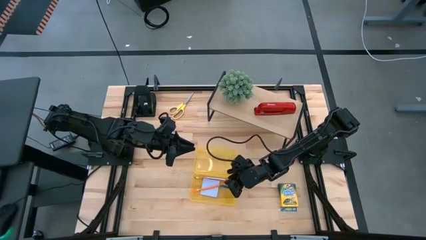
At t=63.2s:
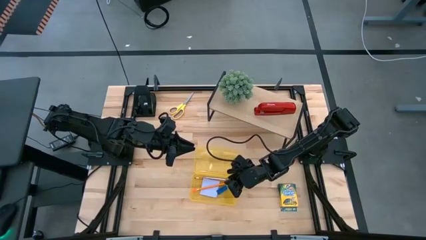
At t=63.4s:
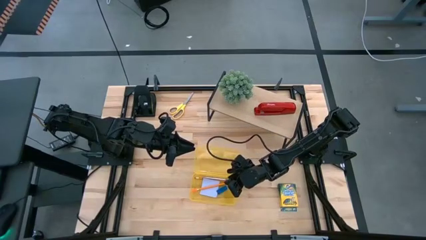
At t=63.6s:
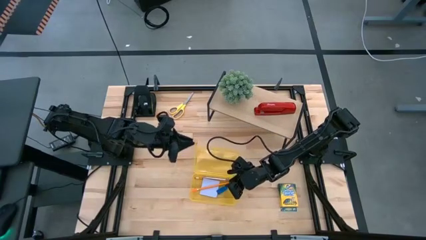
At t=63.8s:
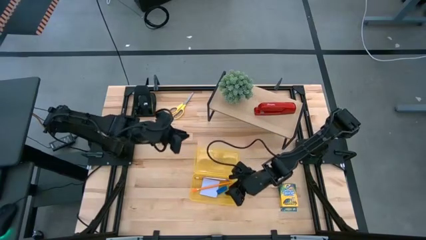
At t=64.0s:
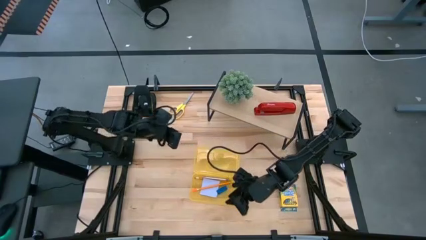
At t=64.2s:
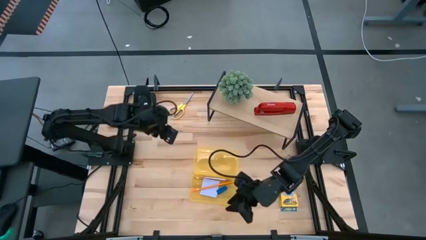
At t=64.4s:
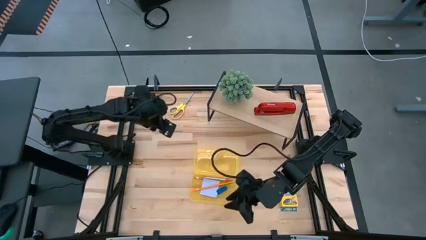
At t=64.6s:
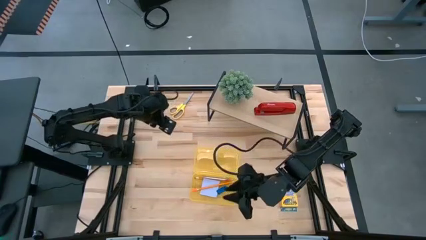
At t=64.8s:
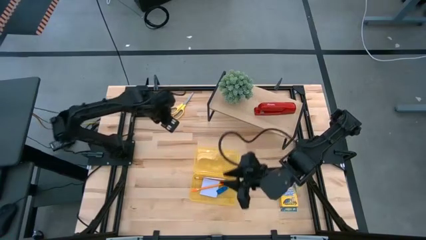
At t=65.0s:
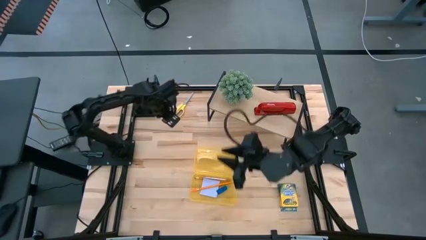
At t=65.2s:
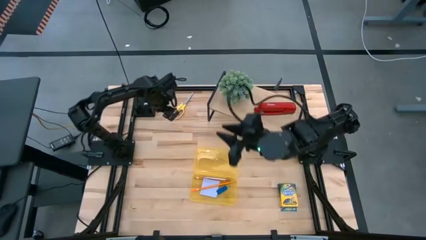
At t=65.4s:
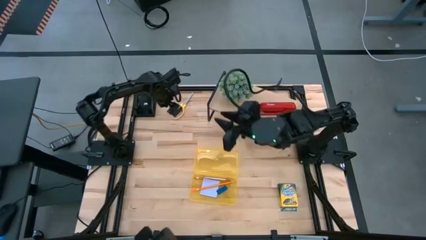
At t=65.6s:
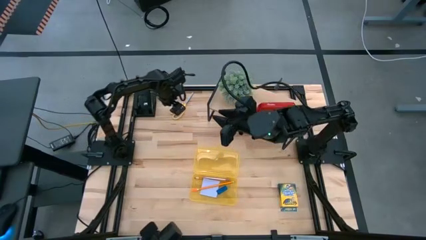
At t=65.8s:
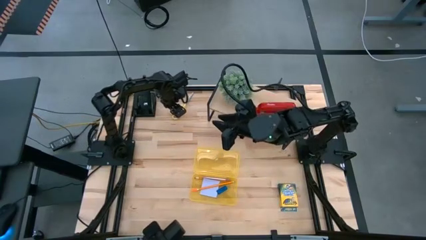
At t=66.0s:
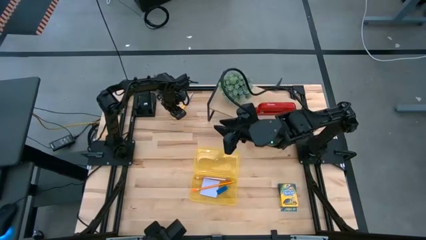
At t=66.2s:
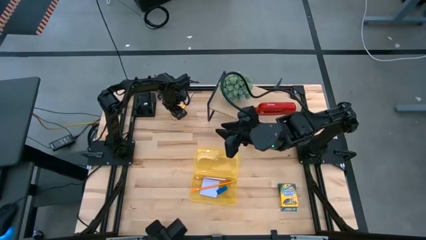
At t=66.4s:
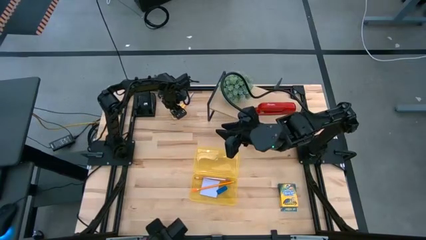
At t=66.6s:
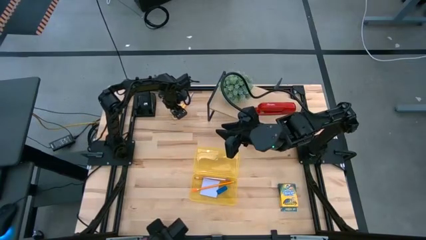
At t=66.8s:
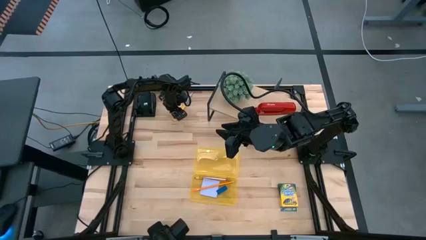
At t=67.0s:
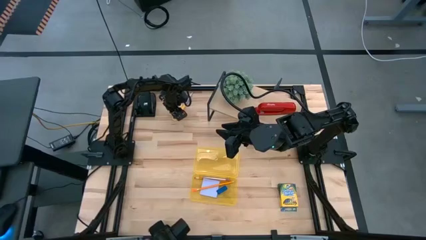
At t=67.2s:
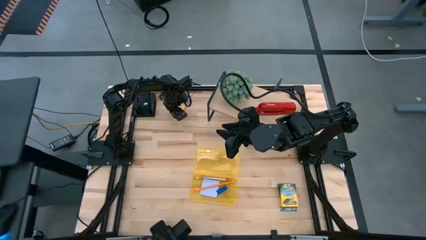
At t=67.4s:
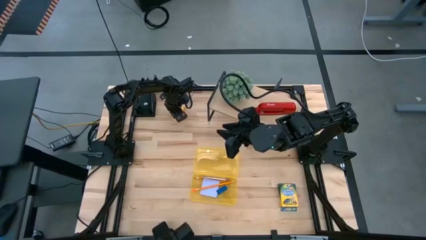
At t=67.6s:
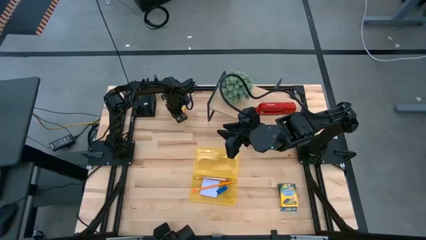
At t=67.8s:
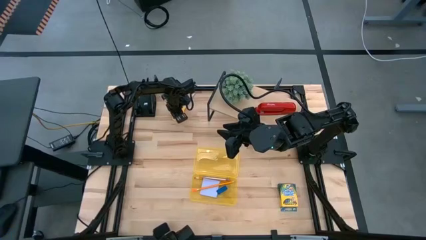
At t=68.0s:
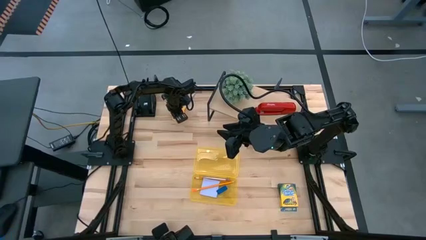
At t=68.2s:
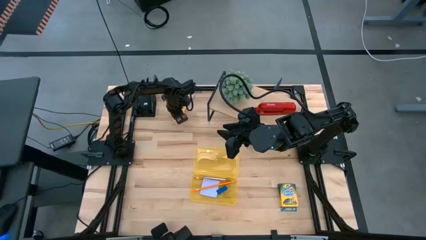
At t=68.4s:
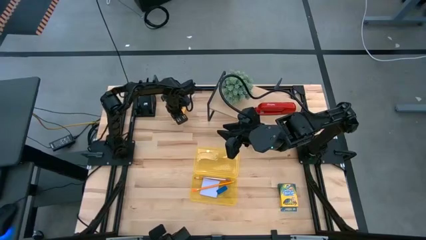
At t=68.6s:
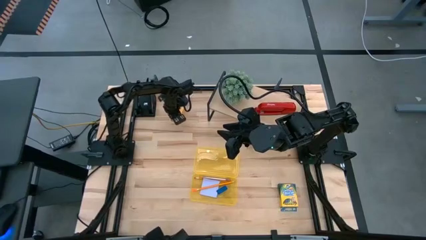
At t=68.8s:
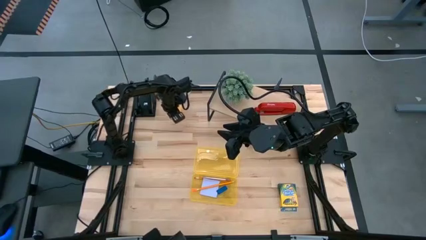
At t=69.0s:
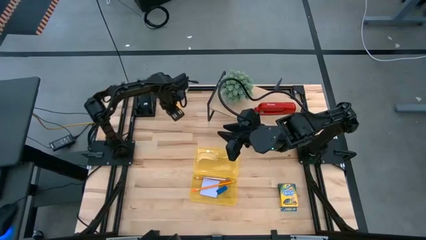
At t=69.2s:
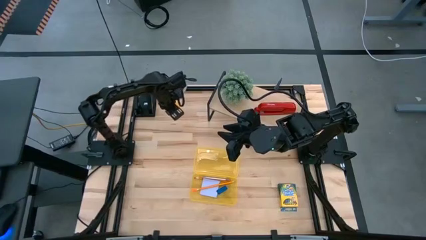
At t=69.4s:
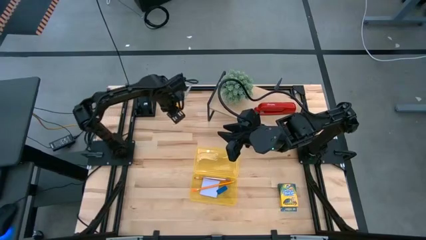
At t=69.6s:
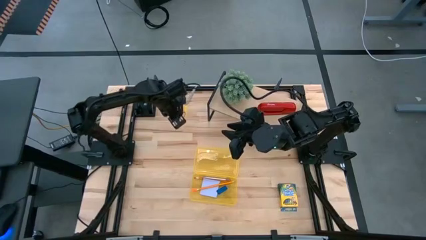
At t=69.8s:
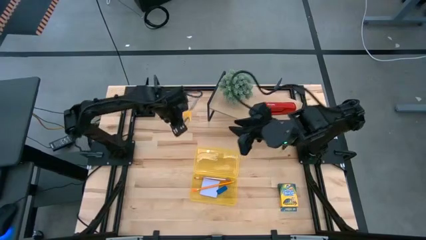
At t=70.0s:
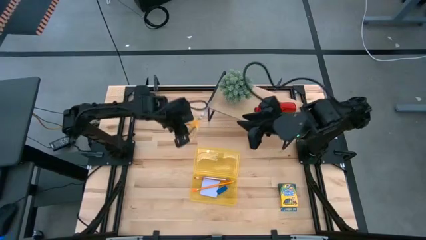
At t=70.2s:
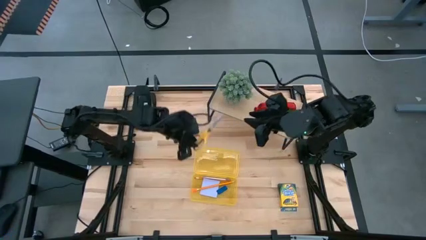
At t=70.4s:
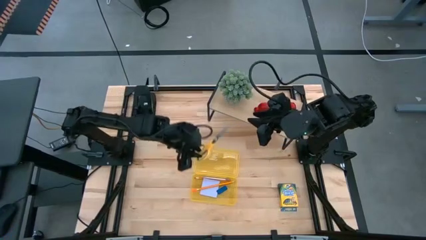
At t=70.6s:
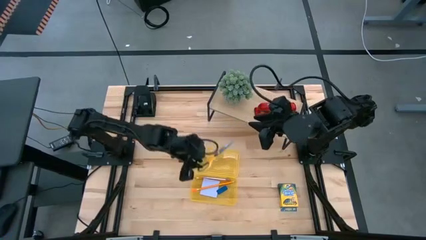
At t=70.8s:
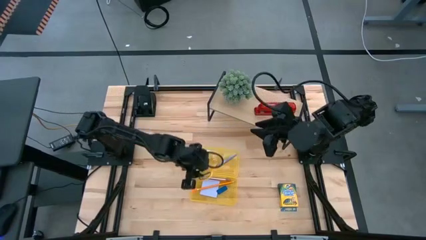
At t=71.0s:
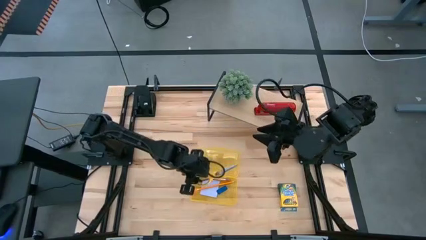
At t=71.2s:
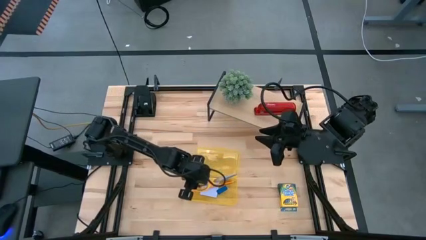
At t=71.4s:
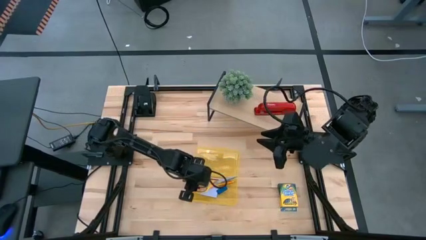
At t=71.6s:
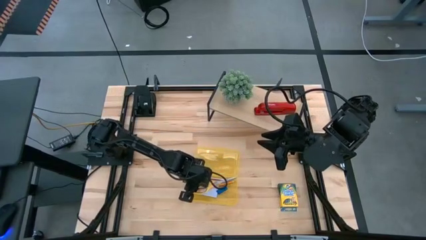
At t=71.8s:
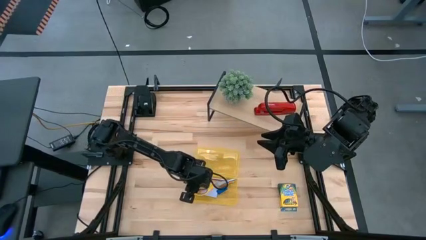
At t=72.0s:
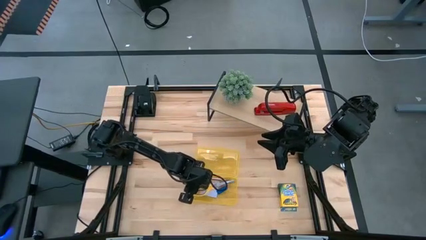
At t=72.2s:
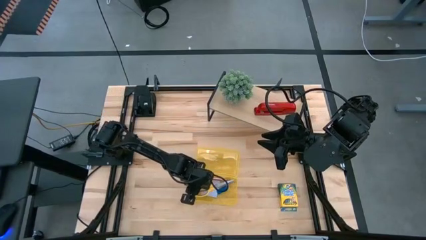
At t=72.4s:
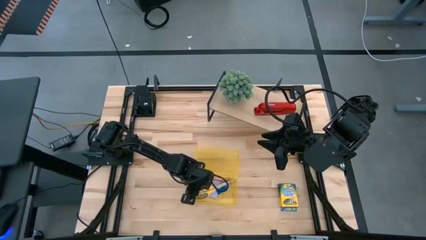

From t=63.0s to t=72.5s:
Task: Pack school essentials
Put the scissor into the supply box
